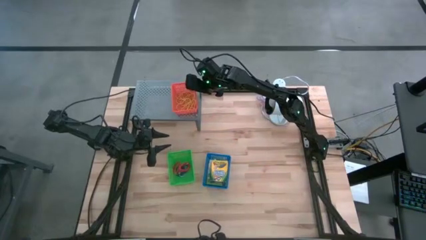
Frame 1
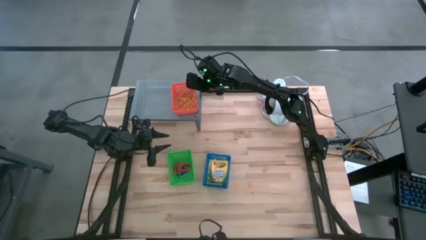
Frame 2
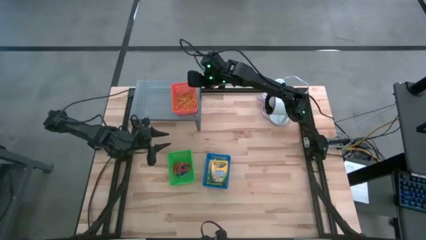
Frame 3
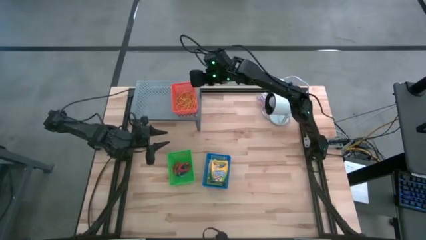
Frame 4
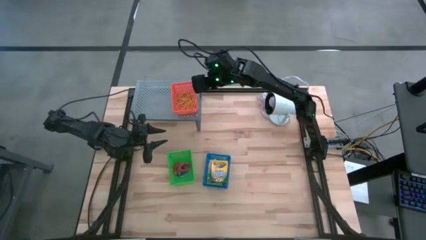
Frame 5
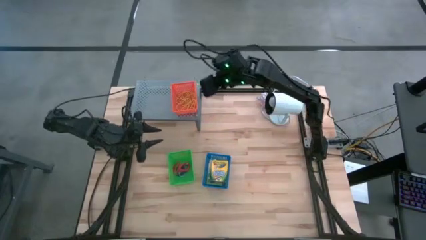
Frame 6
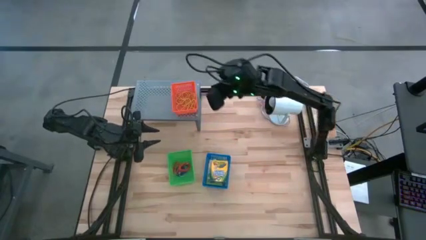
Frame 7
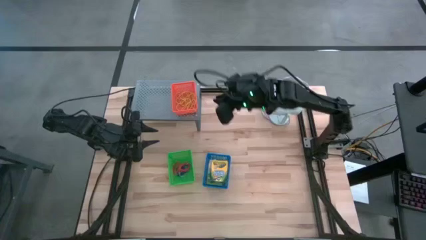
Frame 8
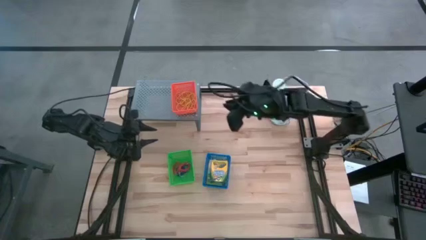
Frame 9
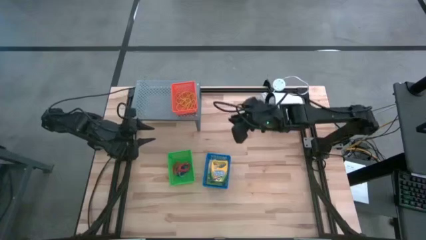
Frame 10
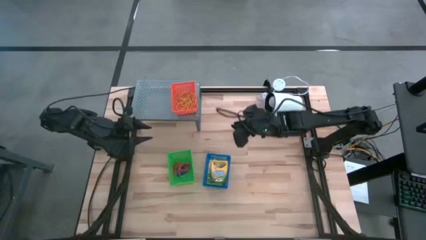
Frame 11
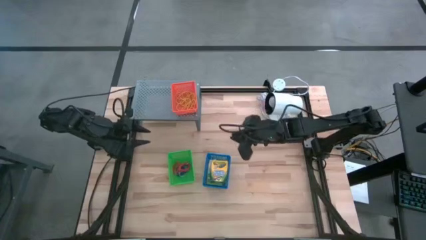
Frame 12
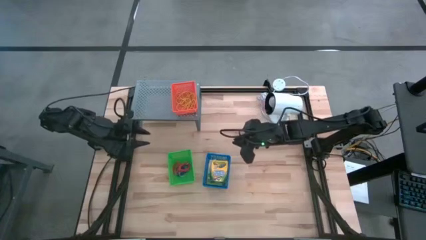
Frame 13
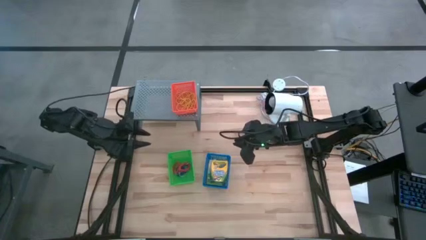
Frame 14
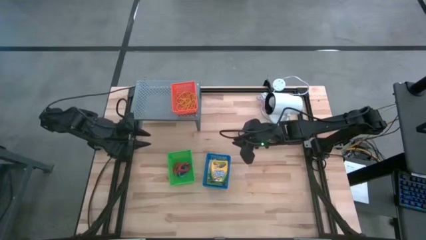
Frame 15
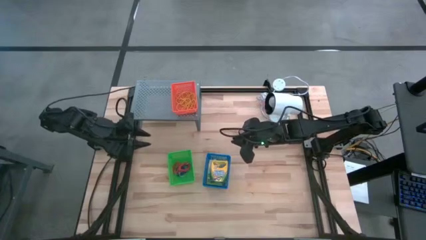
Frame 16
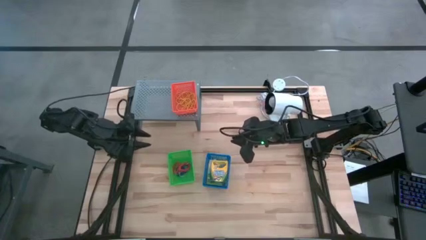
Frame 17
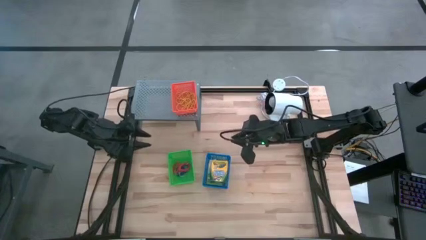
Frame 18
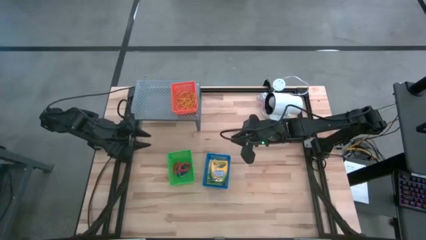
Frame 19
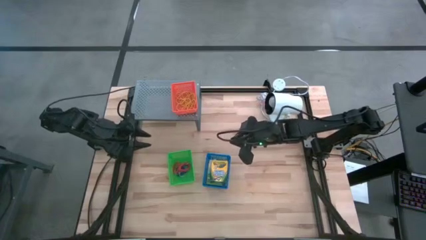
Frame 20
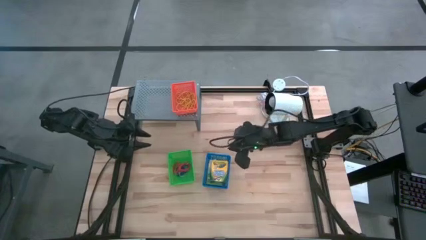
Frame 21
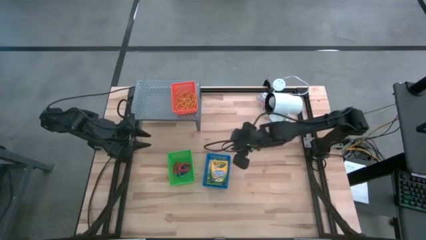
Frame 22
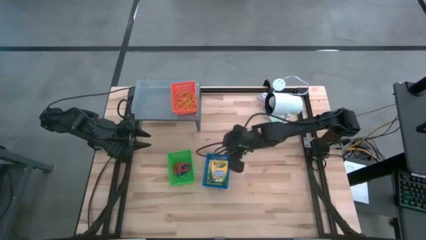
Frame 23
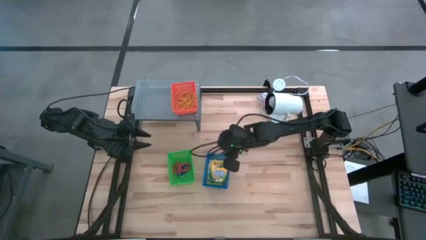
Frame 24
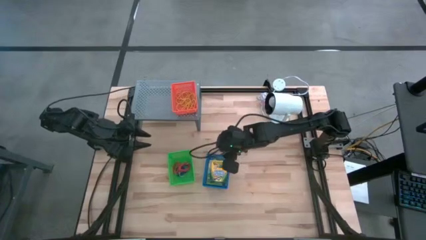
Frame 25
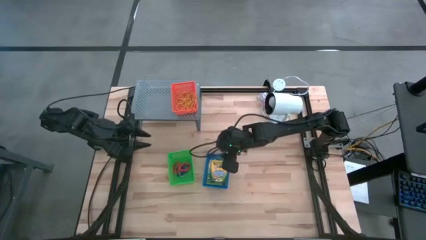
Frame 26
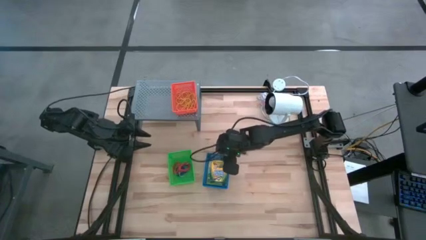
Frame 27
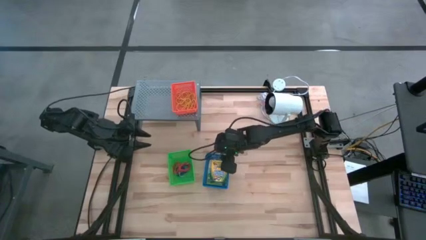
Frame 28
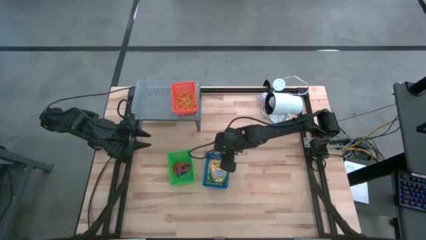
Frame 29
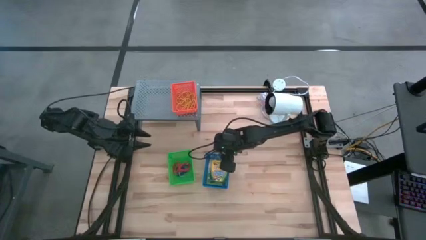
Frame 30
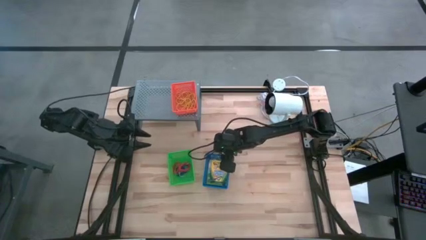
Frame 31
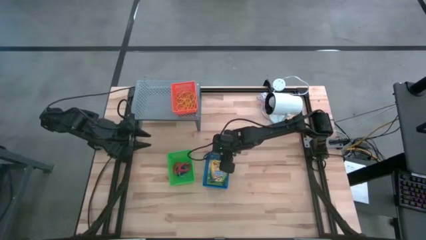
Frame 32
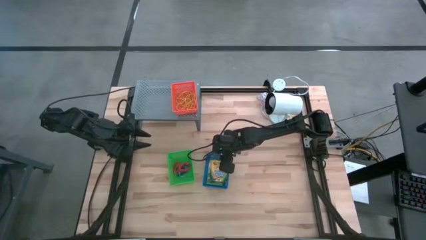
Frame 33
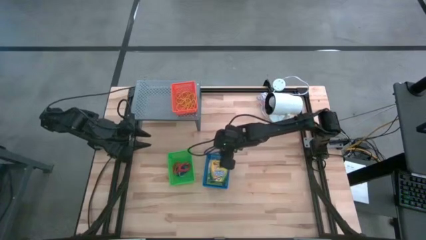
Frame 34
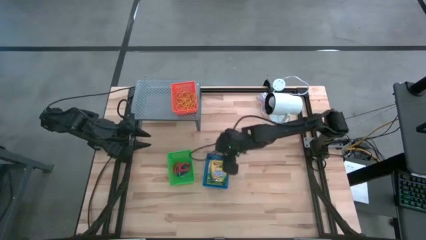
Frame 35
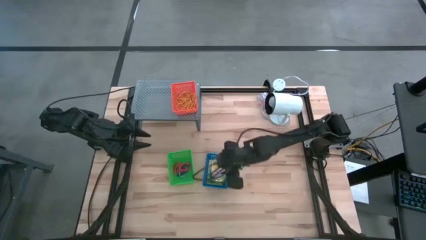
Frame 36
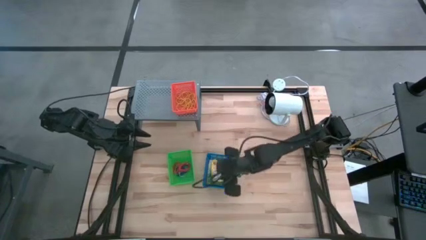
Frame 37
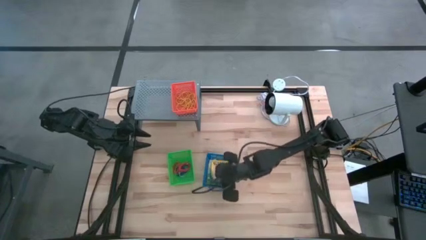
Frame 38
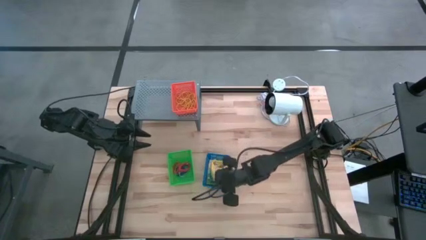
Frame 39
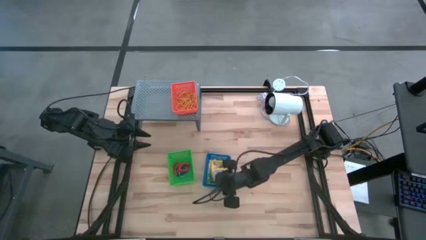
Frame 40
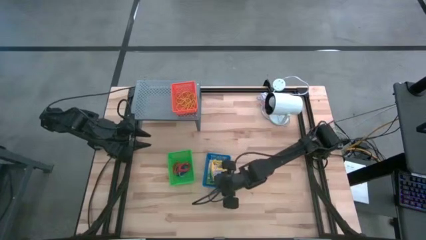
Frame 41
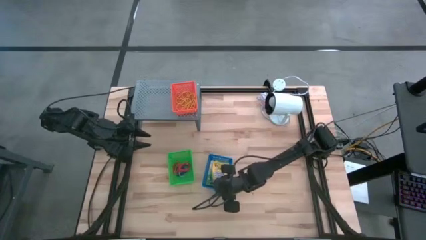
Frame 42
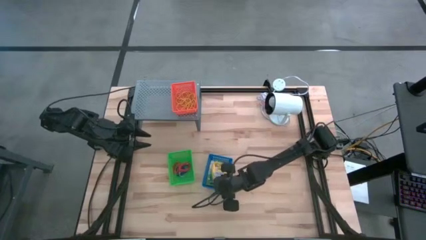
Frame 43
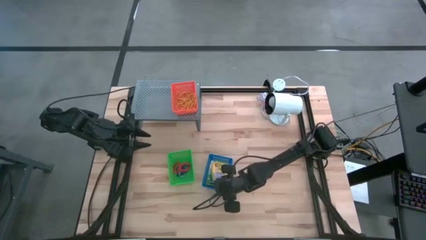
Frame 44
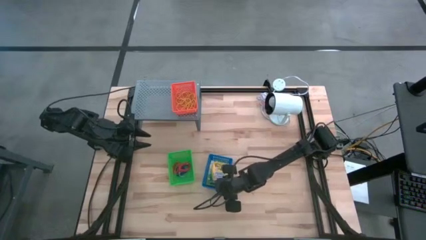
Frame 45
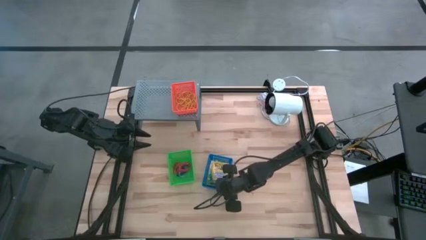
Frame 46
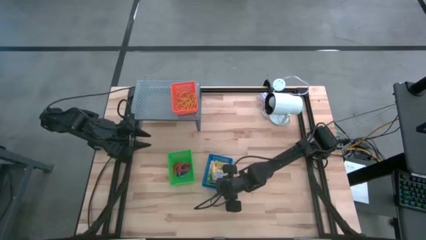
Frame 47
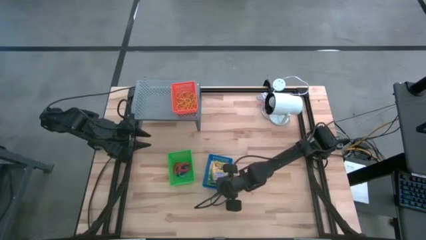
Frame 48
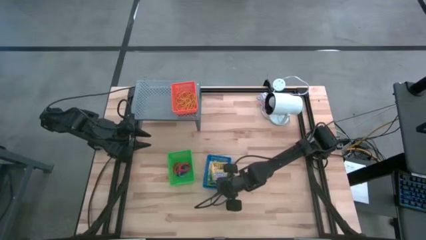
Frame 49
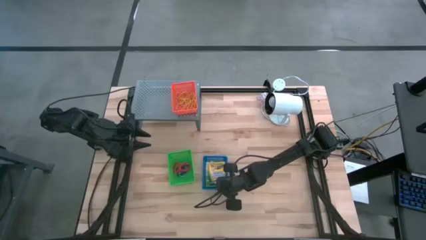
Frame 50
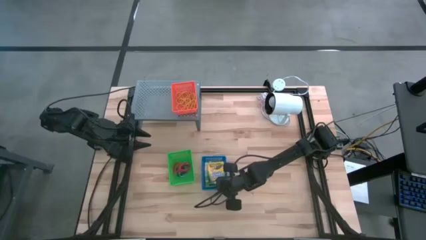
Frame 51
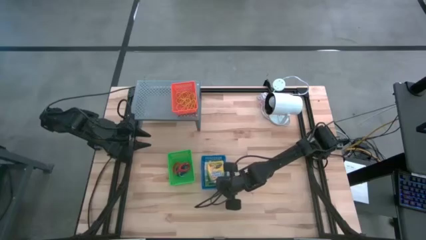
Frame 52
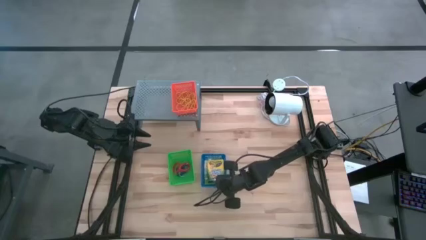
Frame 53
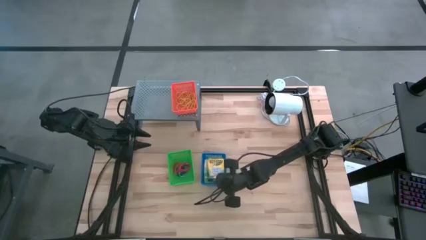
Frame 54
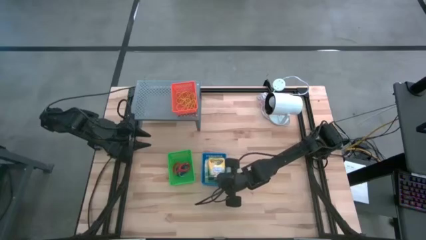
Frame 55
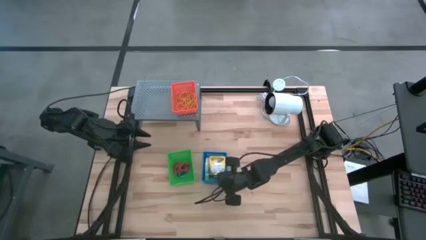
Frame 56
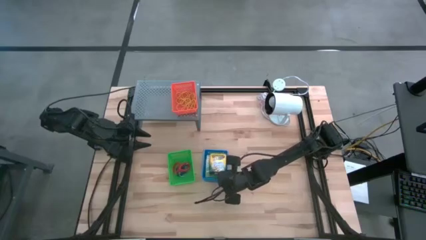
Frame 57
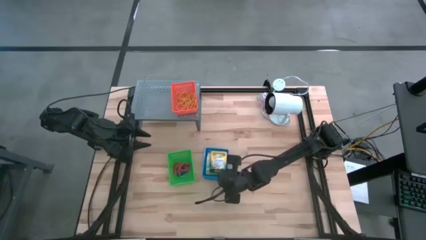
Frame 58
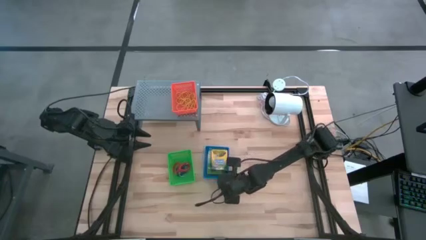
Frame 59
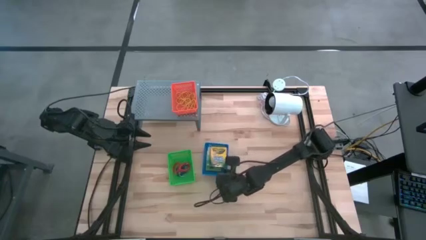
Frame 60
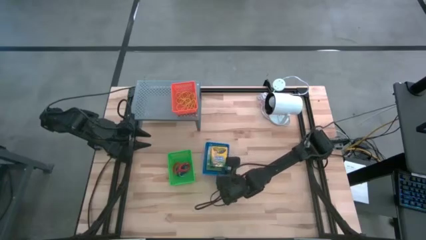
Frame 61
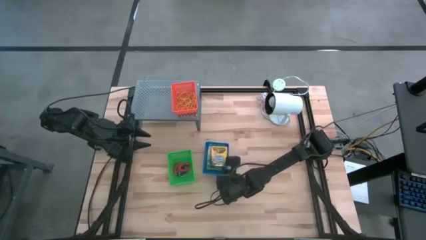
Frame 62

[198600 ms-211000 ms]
Task: Pick & Place Office Desk Supplies
Put the blue bin filled with crayon boxes on the shelf

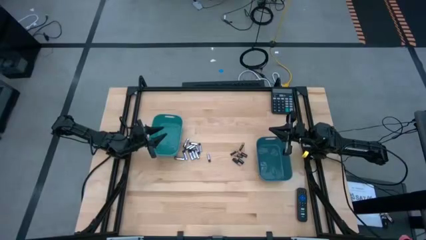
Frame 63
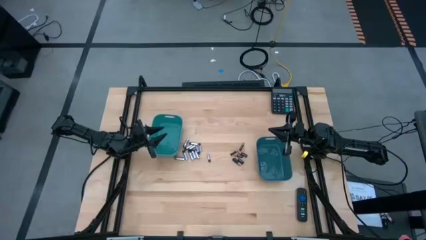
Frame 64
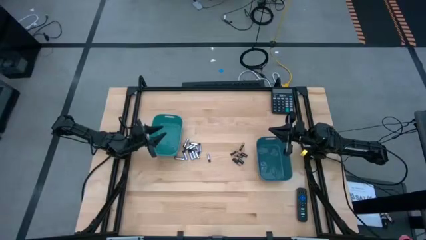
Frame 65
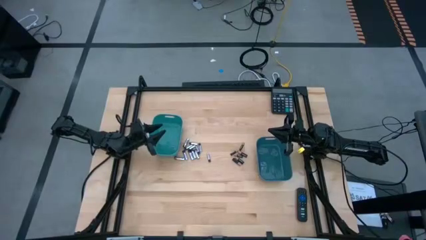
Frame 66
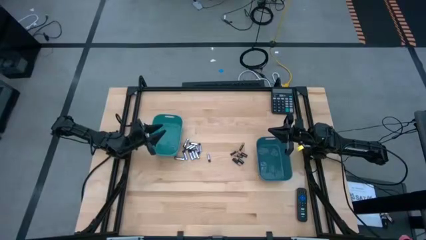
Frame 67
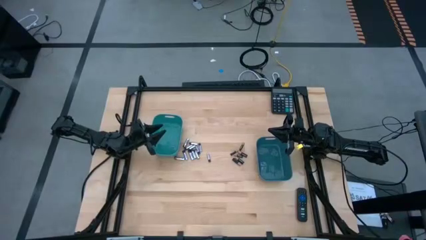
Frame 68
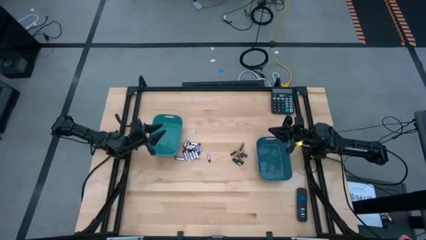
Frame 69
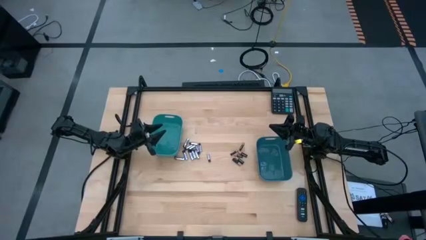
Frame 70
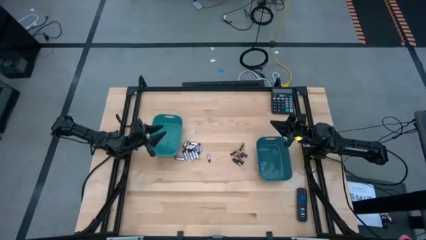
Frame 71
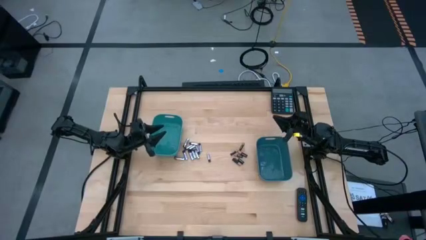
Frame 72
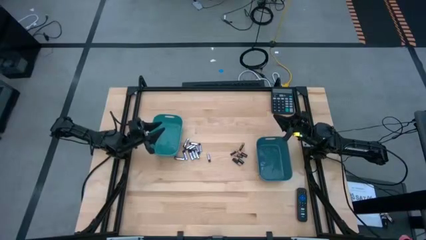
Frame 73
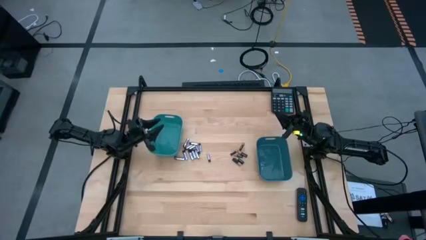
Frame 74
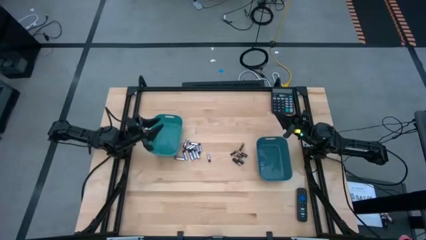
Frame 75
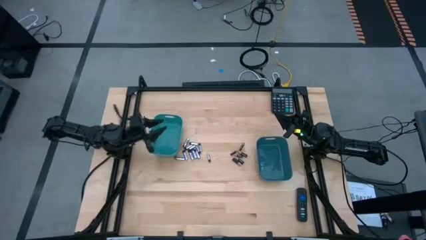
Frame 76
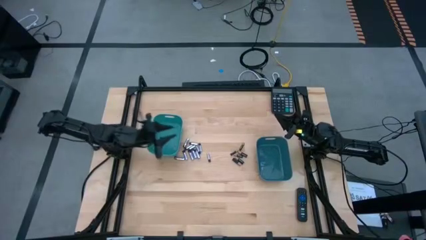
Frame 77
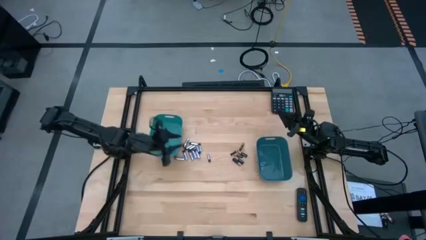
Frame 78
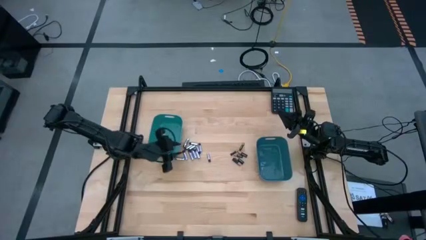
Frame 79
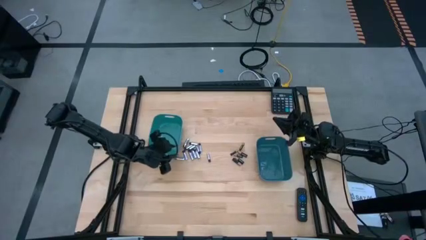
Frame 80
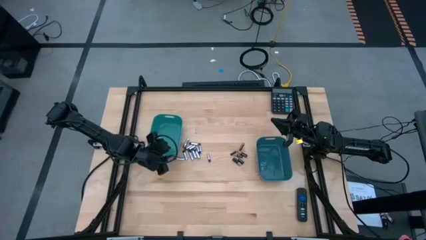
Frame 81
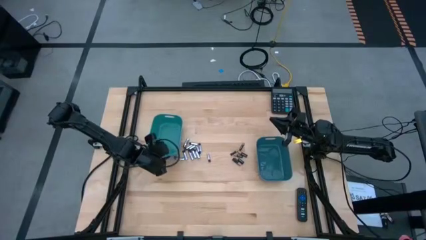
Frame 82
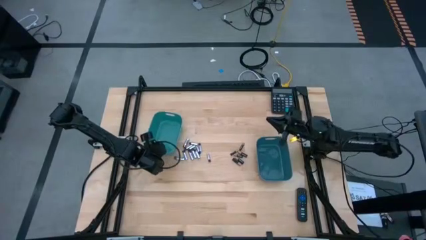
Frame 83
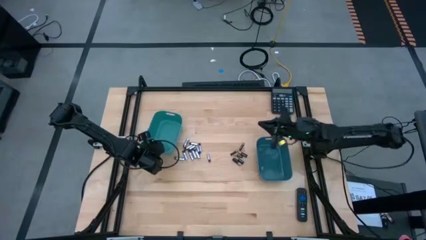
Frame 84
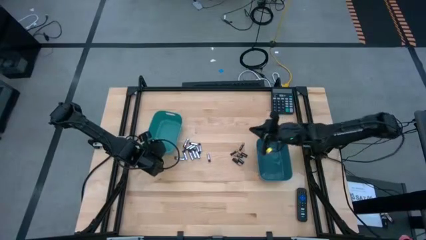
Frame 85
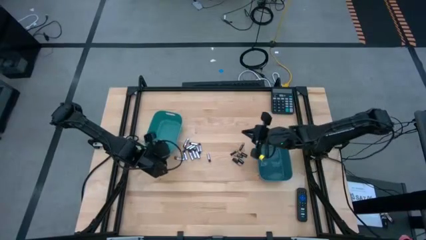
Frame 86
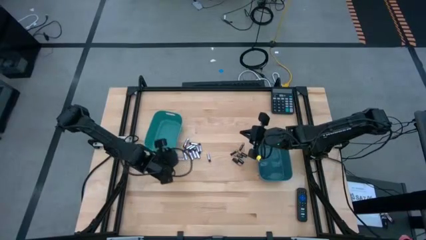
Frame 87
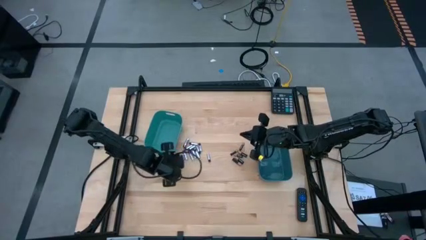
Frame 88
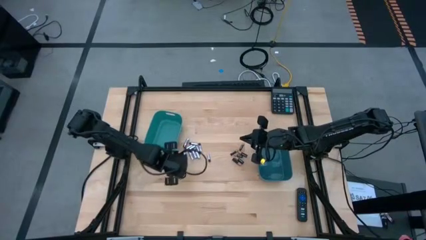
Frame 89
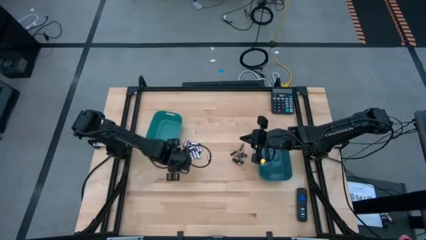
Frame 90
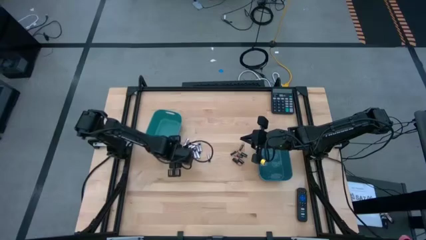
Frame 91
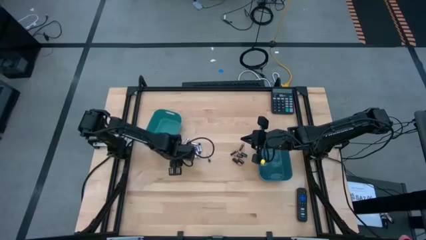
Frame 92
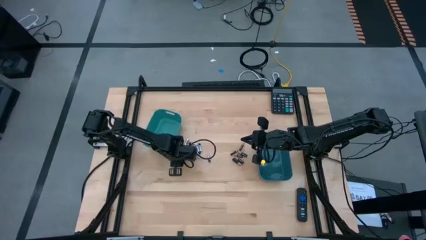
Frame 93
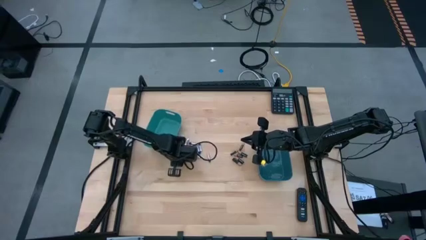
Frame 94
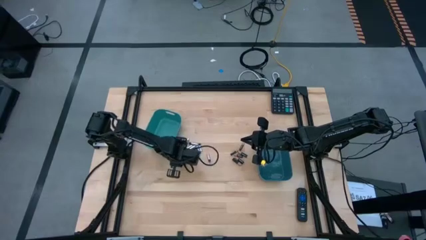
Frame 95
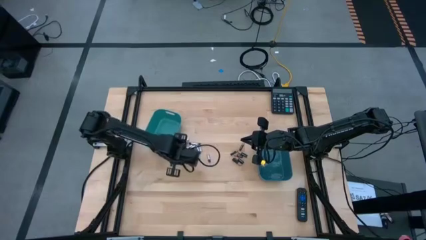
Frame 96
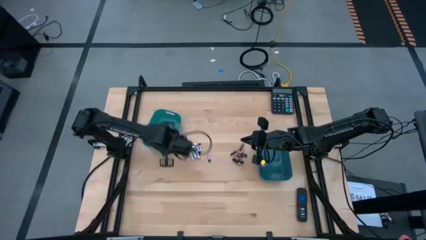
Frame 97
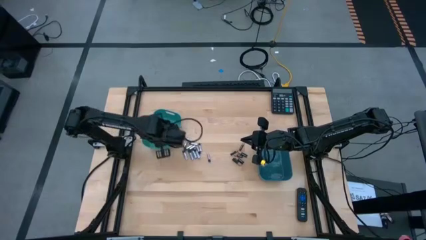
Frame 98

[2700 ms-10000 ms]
Task: Sort batteries
Put the silver battery into the green bin
